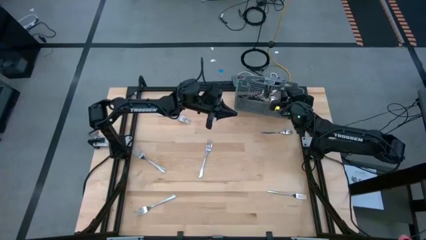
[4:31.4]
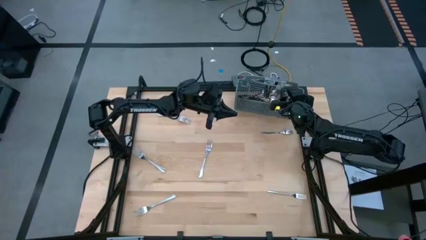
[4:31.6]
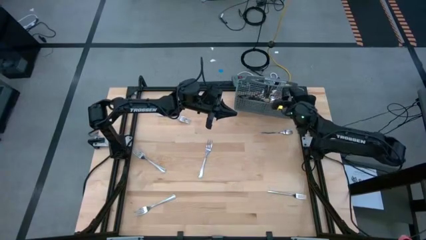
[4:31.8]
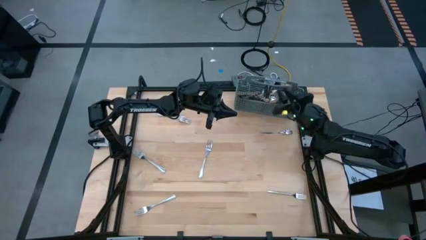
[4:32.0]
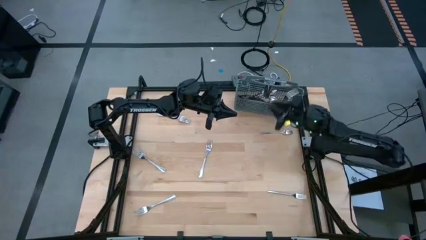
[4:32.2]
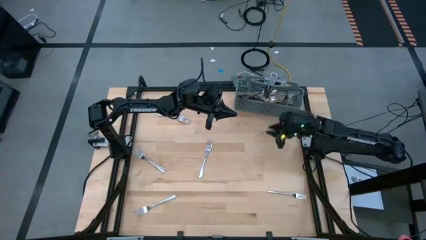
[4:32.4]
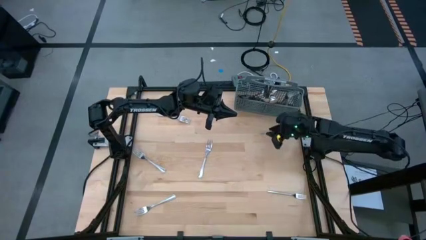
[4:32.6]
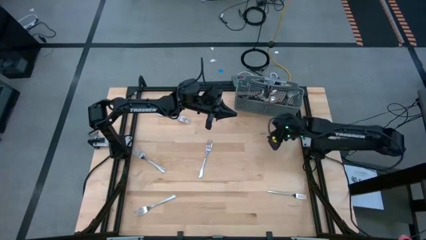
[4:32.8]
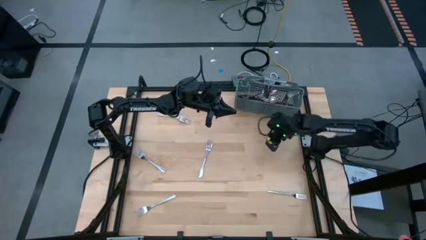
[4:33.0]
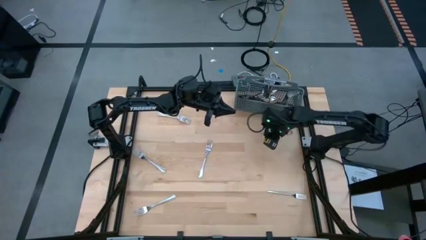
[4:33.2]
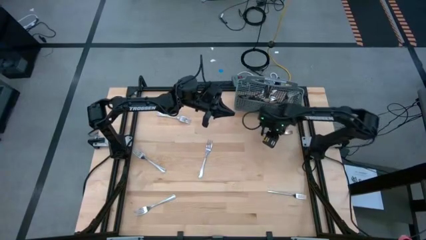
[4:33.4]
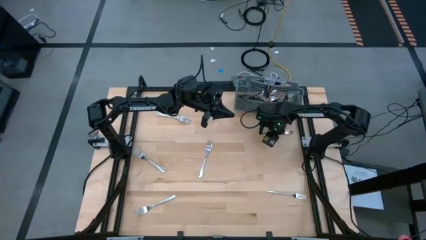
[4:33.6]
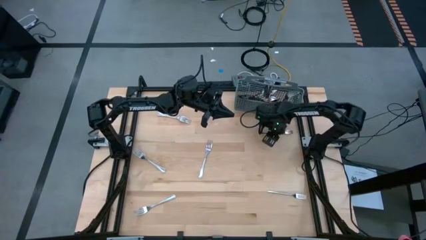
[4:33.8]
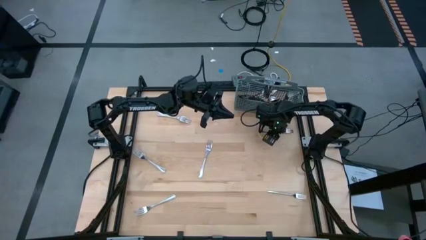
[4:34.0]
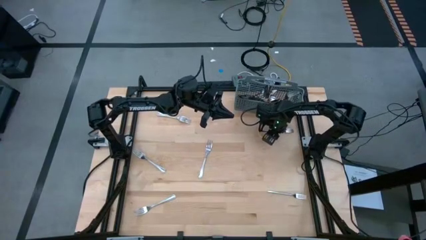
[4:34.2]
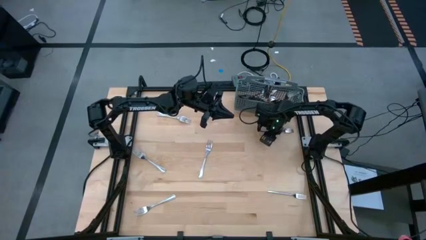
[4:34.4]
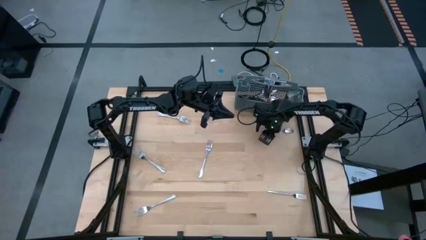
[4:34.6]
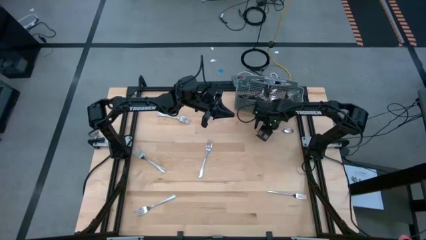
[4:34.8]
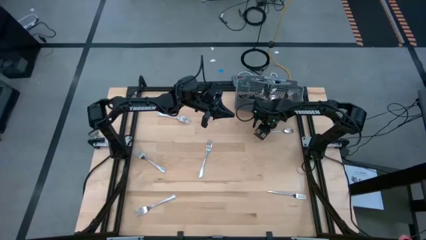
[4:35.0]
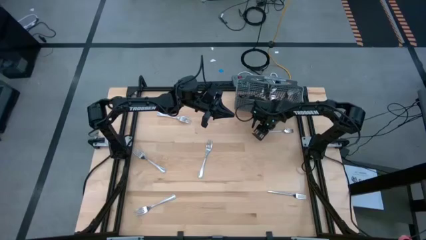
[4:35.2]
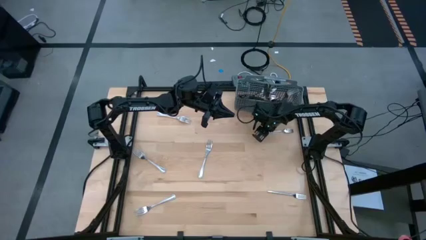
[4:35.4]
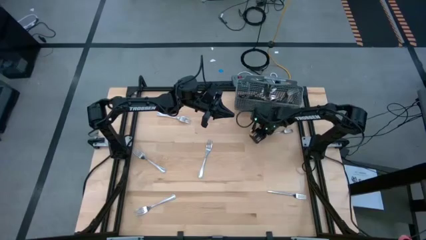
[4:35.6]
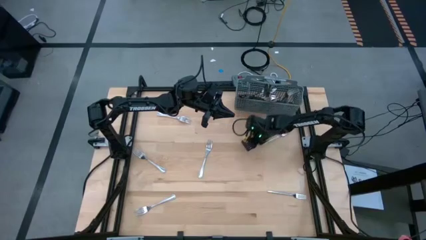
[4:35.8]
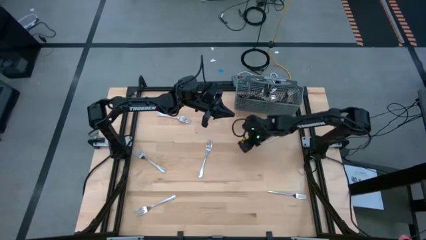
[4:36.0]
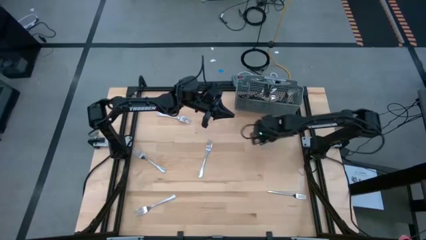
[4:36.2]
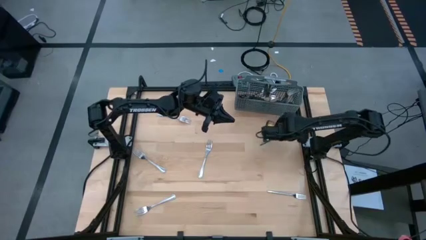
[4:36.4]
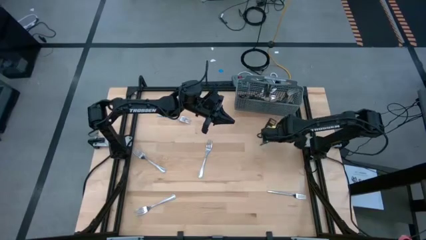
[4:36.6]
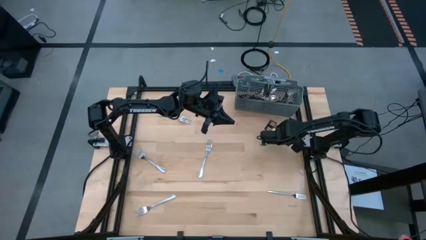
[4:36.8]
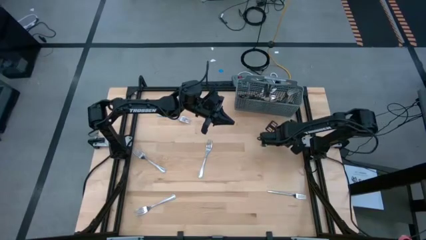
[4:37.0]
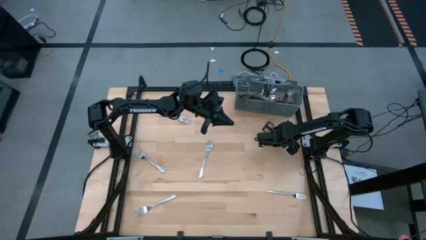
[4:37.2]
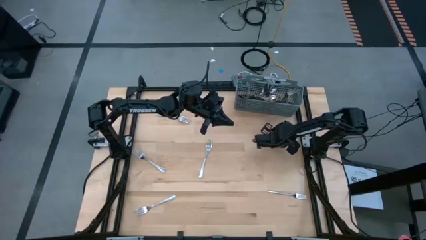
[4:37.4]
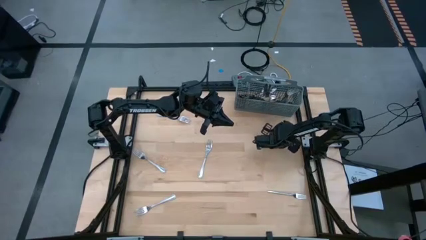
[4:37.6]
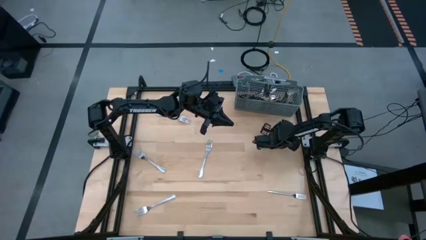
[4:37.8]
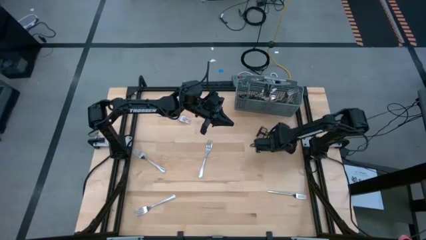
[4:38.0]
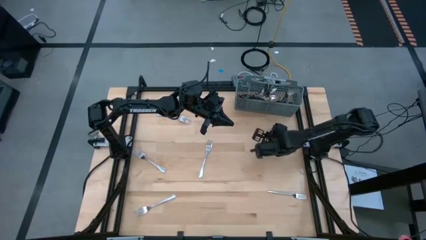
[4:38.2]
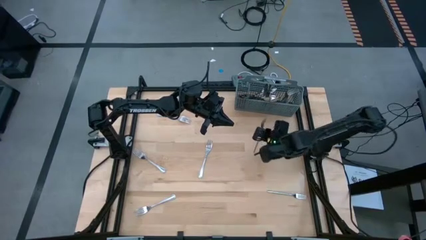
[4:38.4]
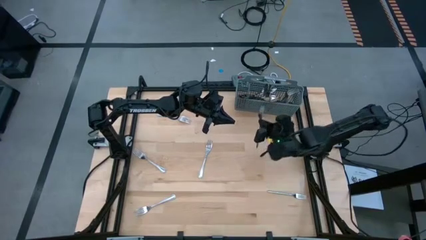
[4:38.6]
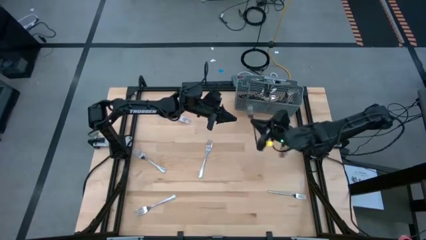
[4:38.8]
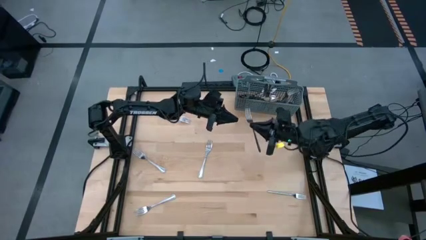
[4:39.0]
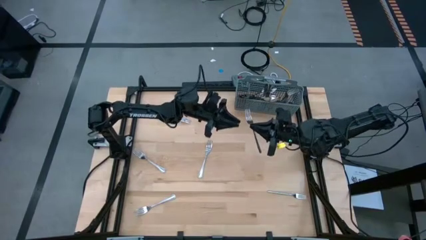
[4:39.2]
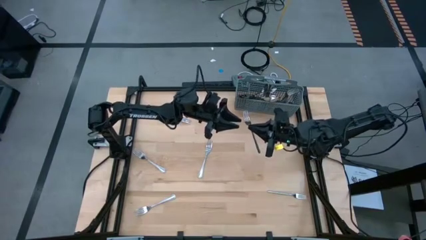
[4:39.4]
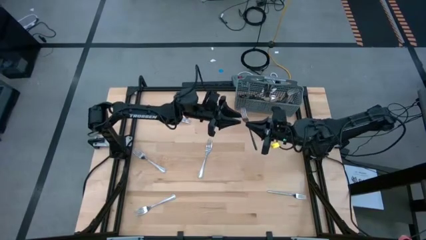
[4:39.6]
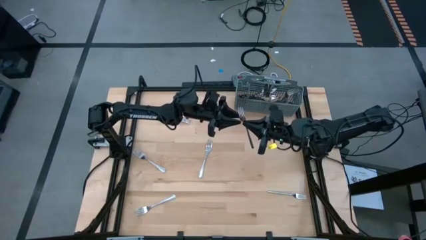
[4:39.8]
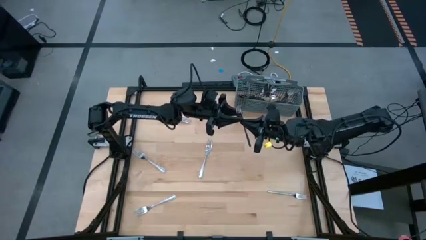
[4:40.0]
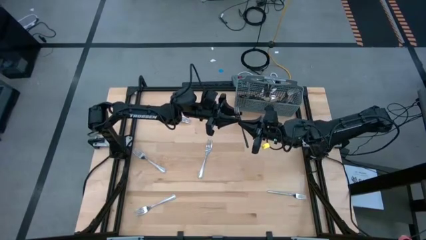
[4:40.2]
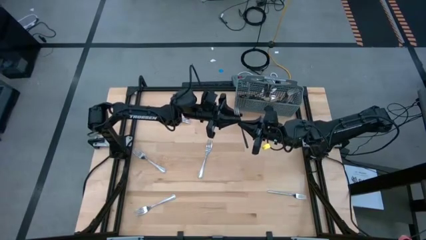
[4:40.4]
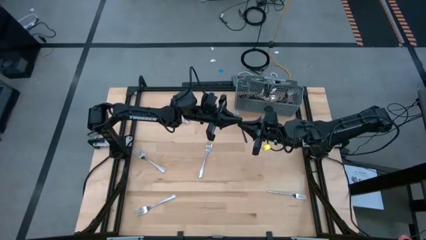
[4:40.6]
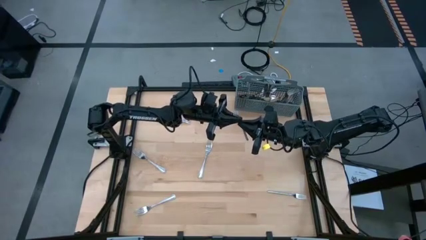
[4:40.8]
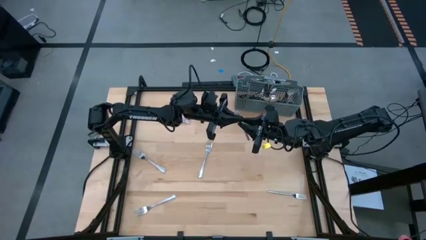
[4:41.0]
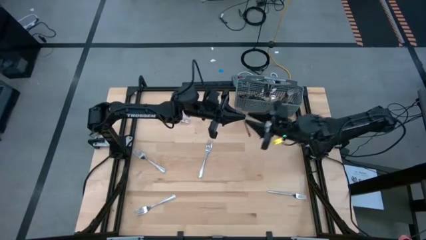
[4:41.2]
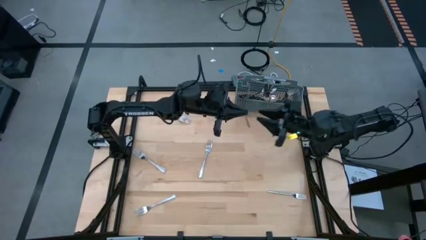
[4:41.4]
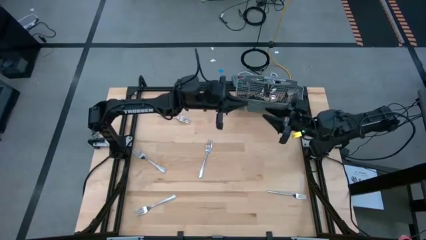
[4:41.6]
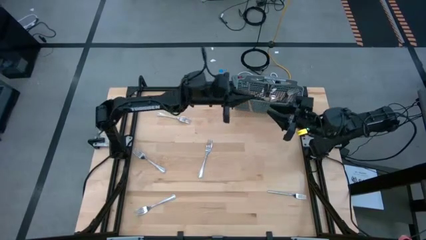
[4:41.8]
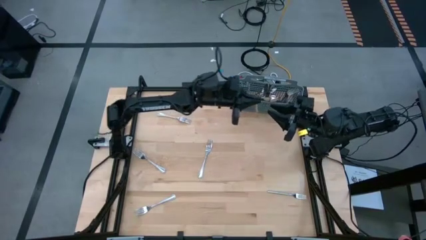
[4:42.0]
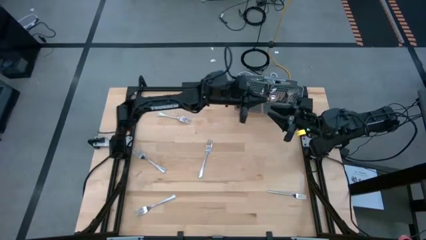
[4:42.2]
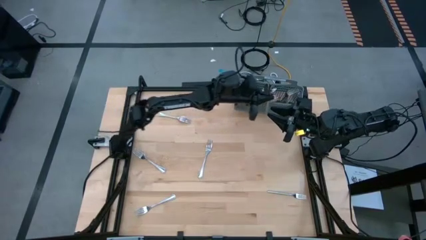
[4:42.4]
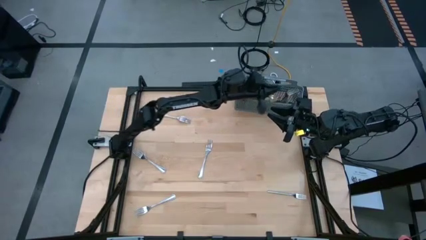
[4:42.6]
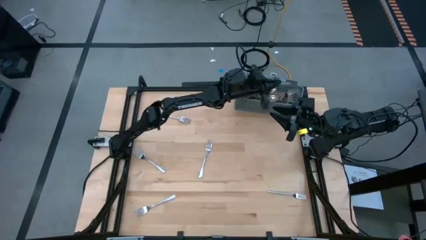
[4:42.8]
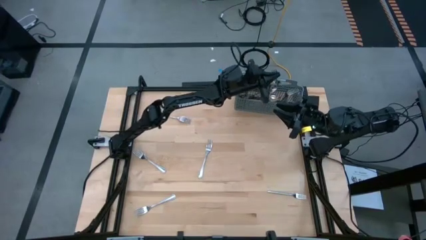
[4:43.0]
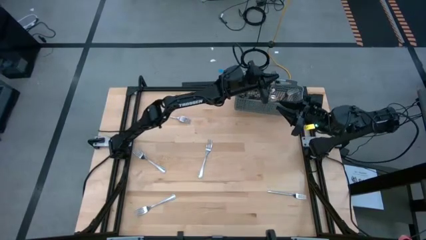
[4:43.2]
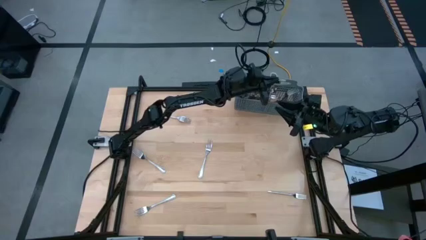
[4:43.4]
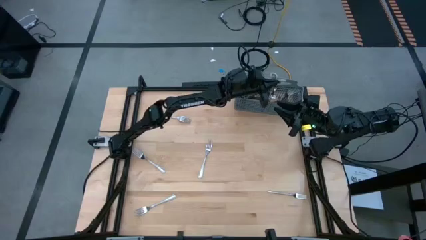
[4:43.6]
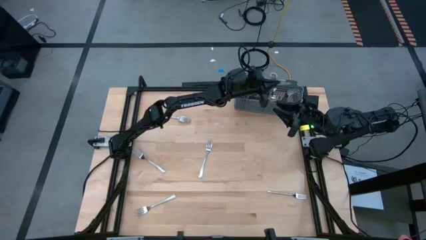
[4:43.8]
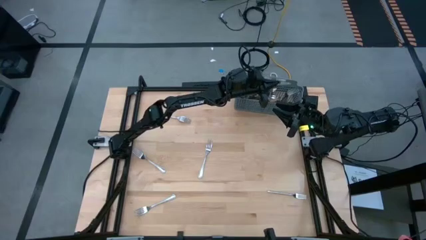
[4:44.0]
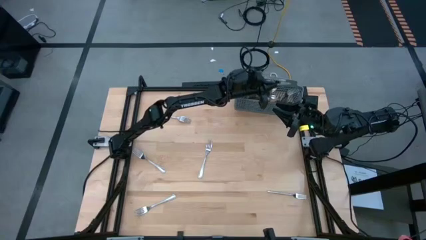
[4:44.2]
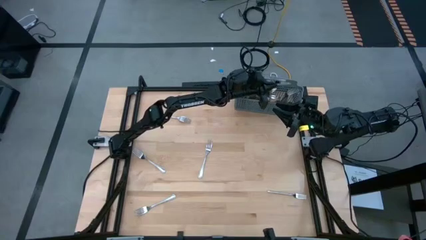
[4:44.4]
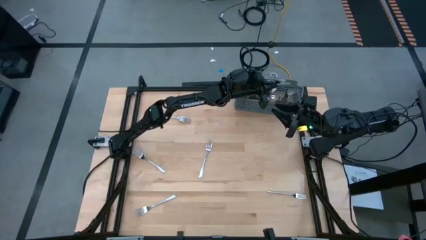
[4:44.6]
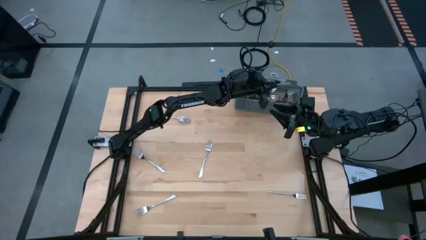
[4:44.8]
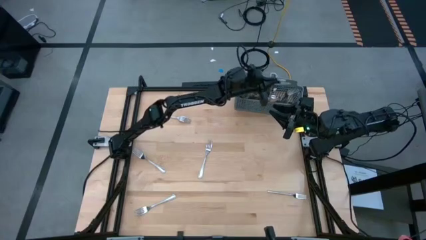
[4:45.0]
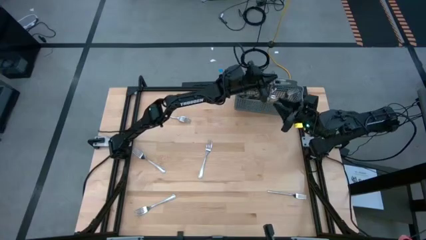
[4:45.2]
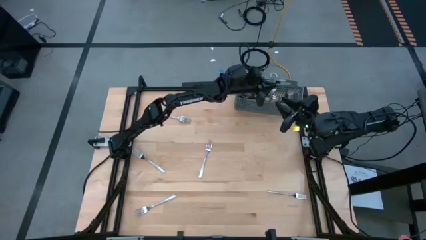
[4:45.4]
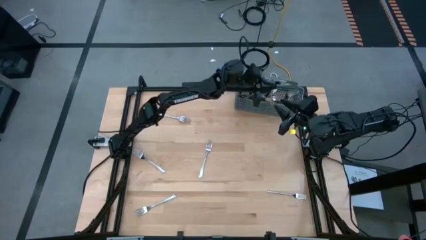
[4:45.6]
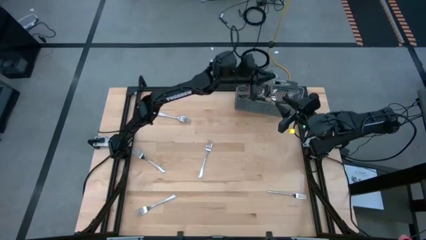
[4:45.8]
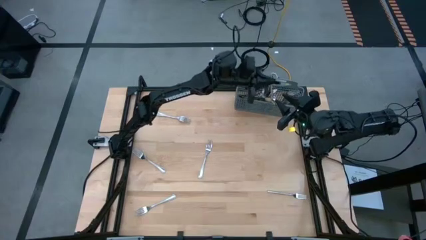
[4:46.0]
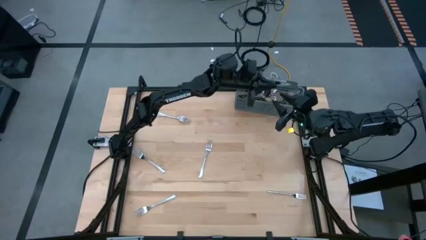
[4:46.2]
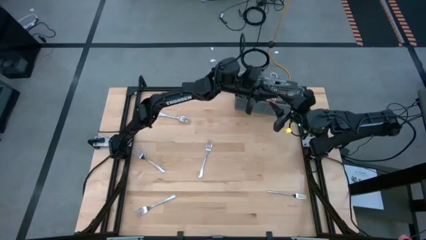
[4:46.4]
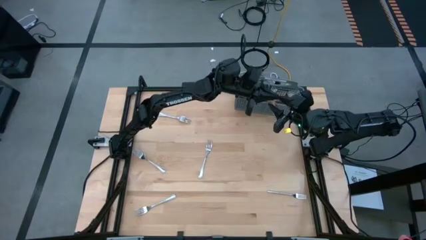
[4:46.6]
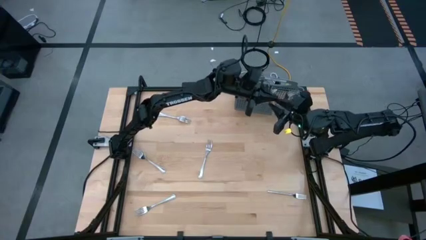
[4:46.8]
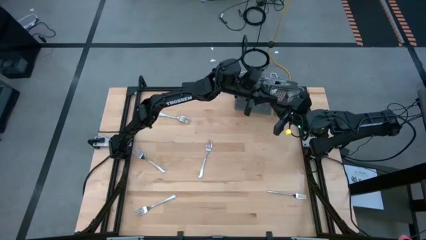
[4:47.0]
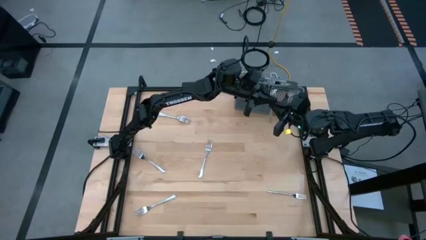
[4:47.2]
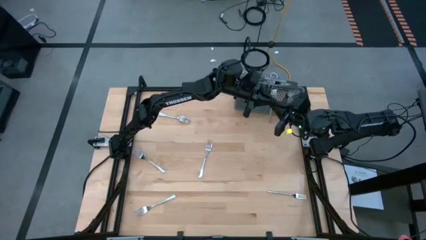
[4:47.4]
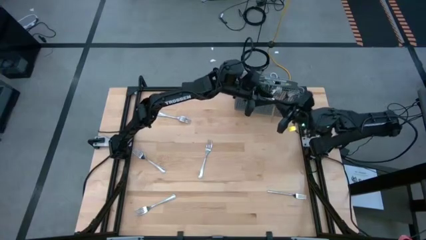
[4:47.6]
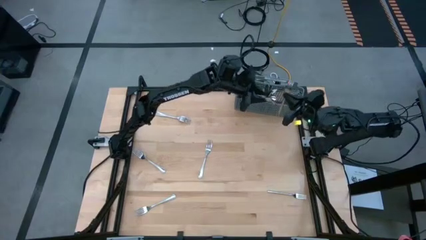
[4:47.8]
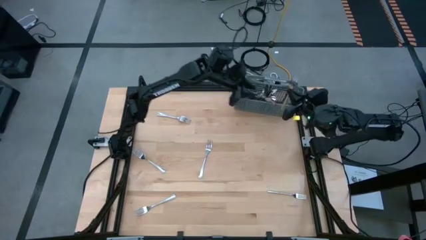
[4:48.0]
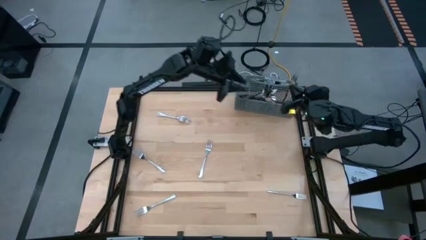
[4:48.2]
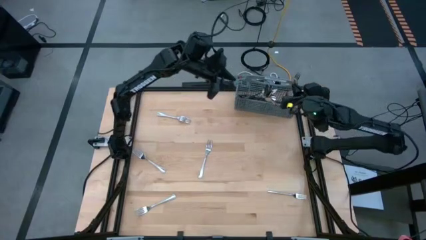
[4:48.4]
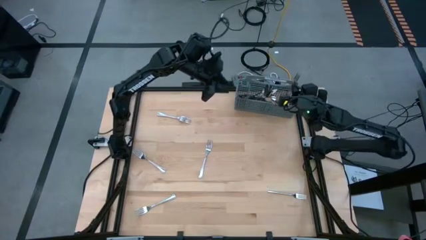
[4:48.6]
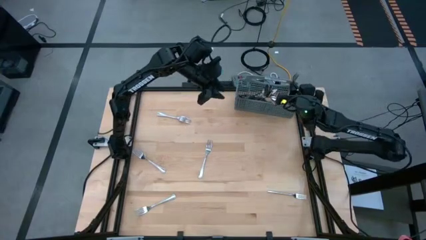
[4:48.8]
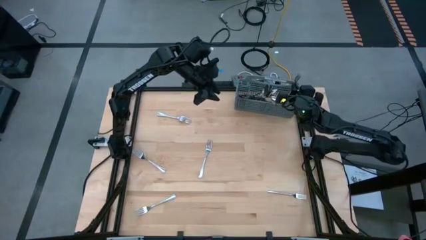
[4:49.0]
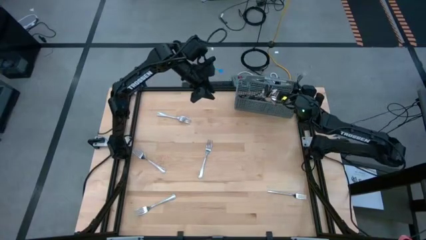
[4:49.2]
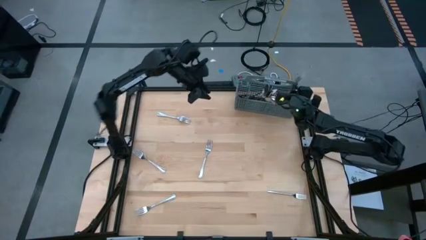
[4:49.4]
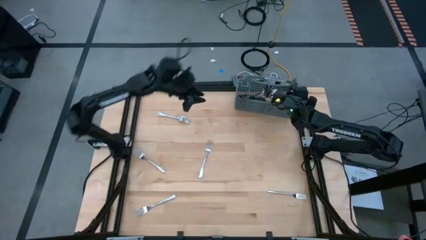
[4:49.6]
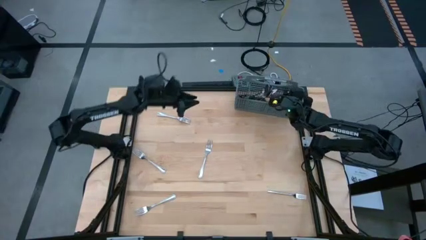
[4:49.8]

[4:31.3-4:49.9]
Task: Sort silverware
Put the silver spoon into the silverware basket
